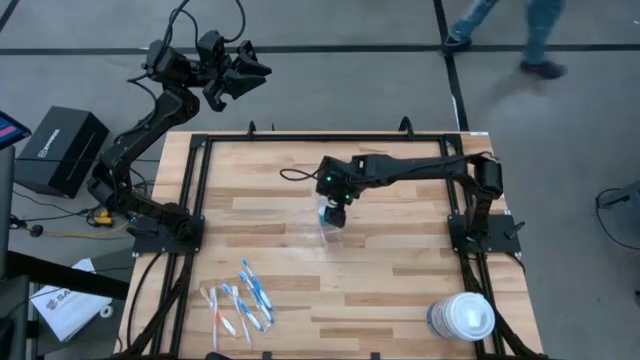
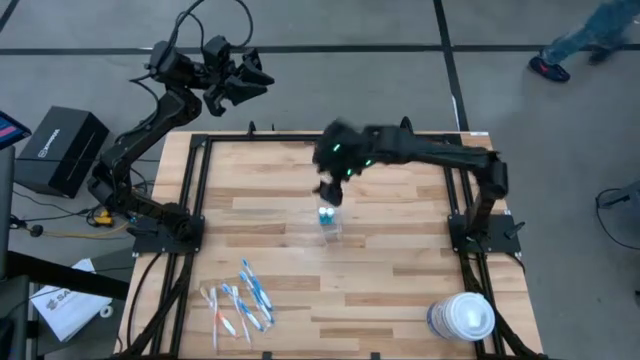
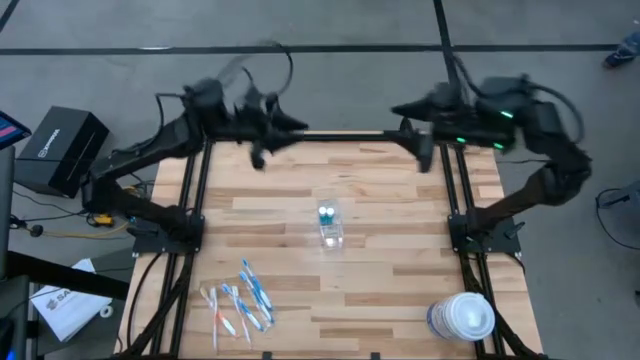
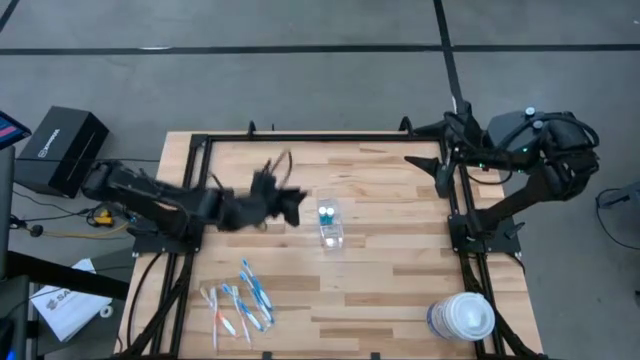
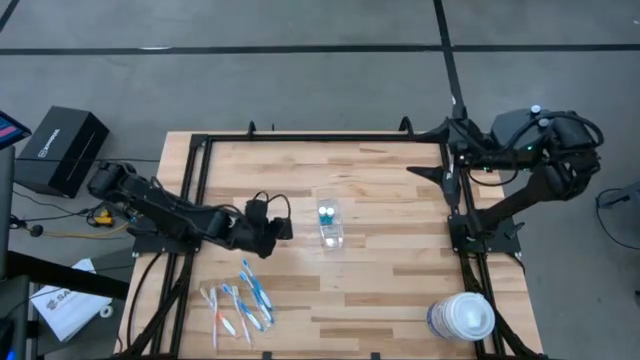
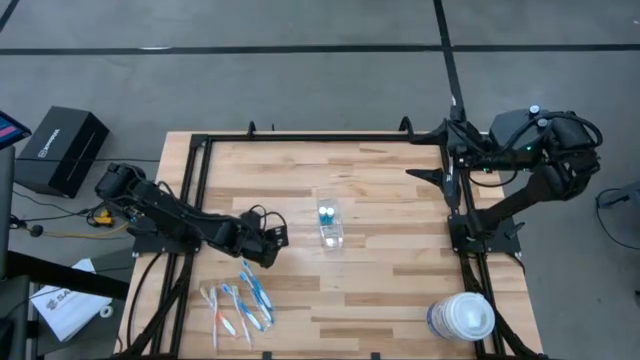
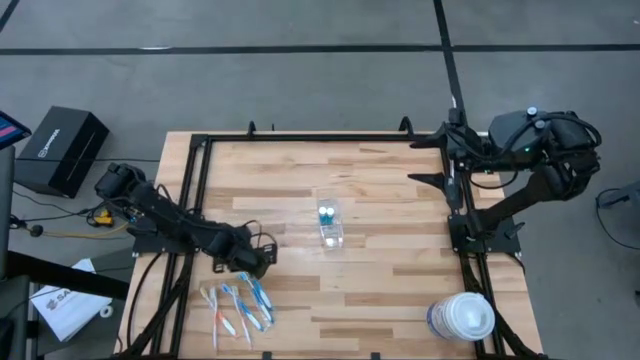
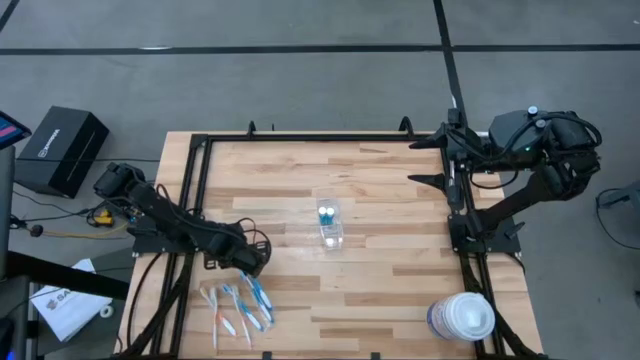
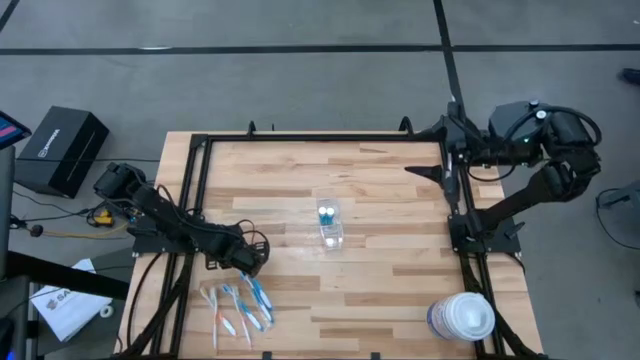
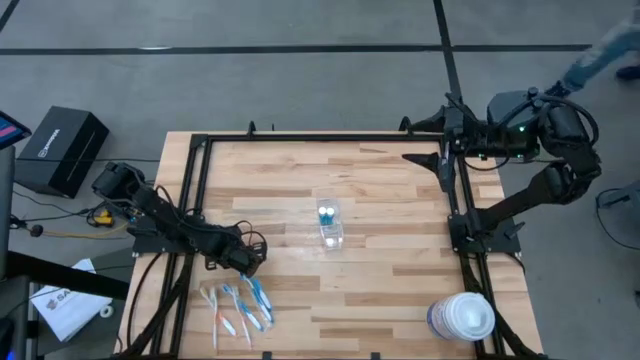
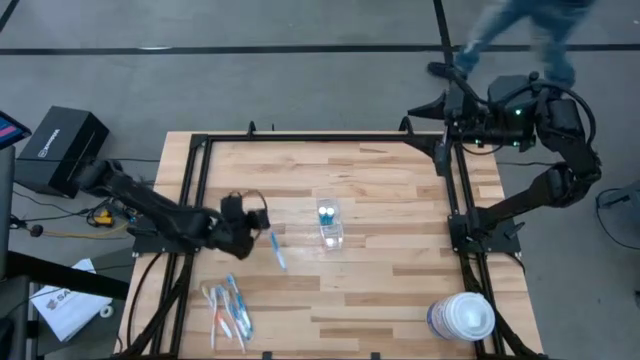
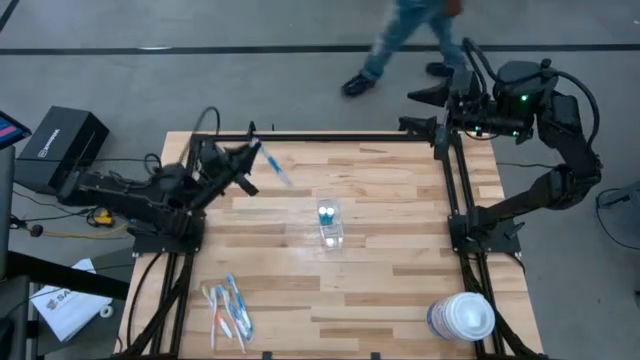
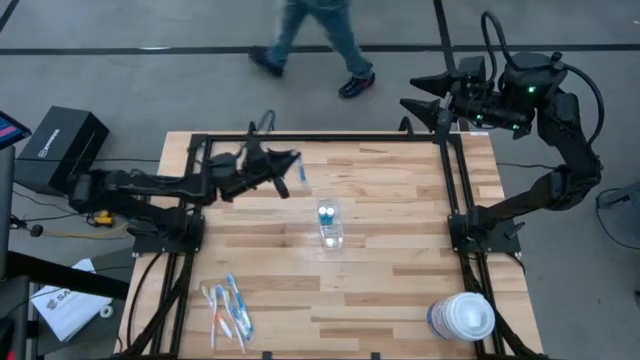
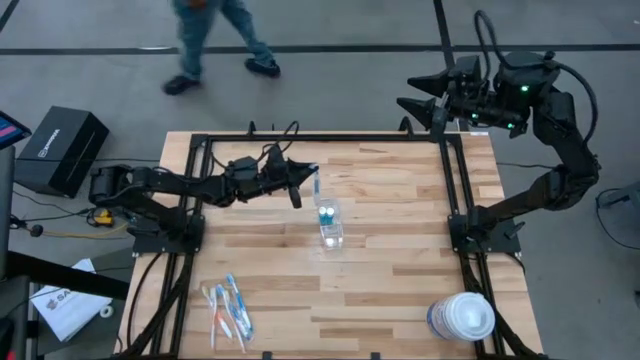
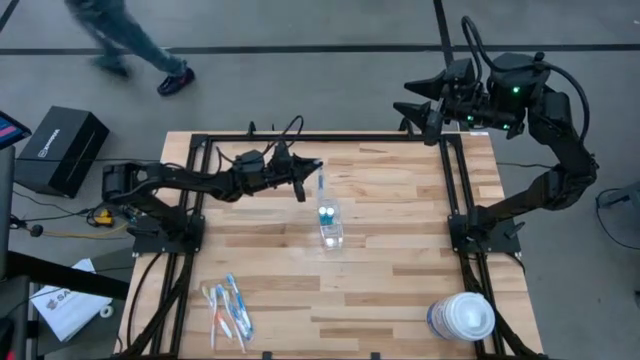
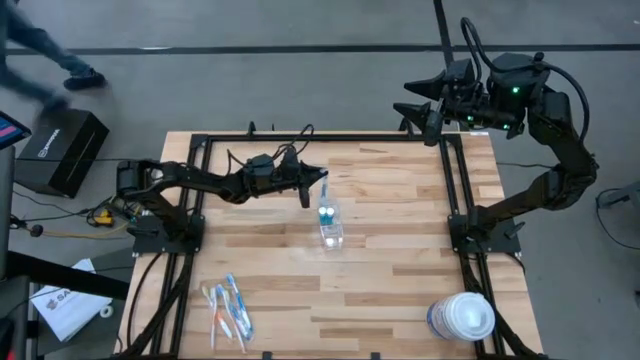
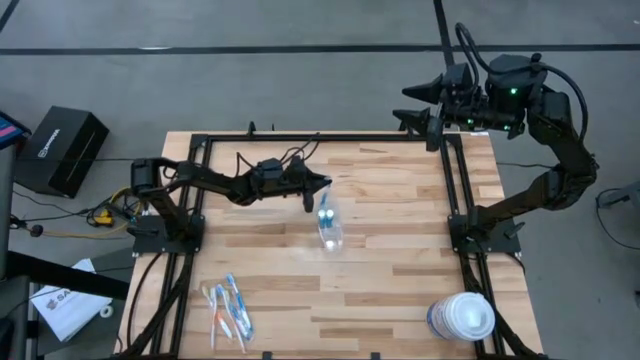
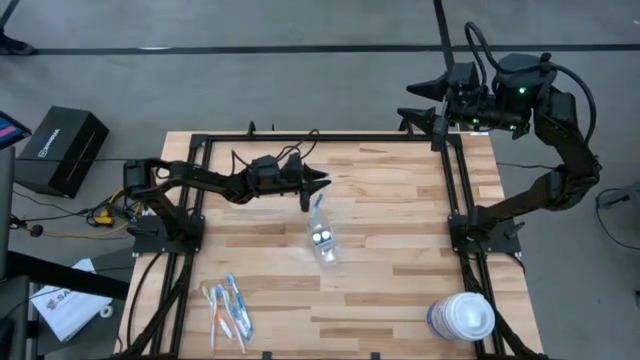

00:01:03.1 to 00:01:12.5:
Task: Pick & Place toothbrushing station
Put the right blue toothbrush into the transparent organizer

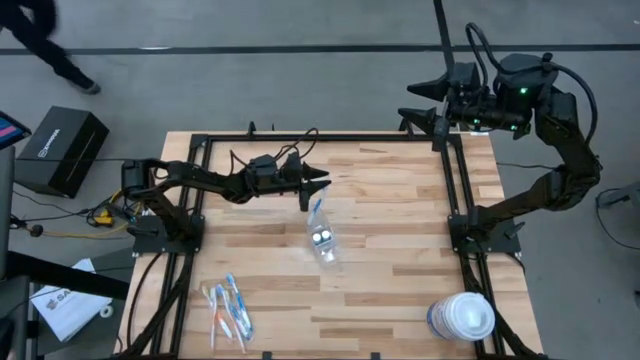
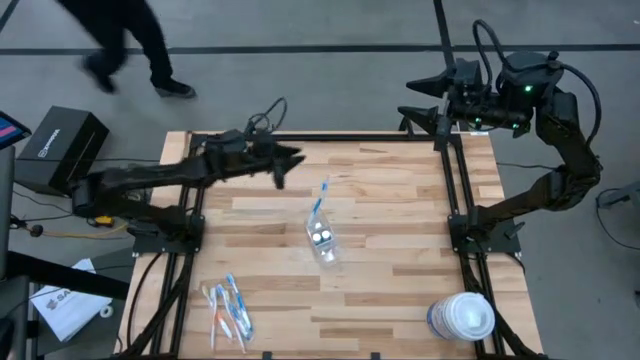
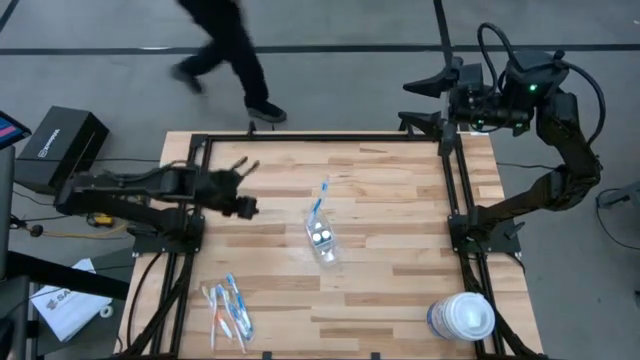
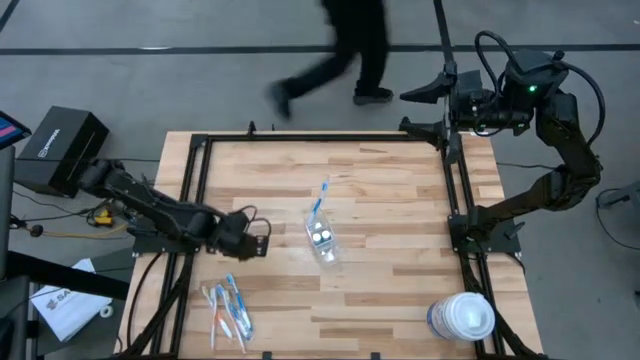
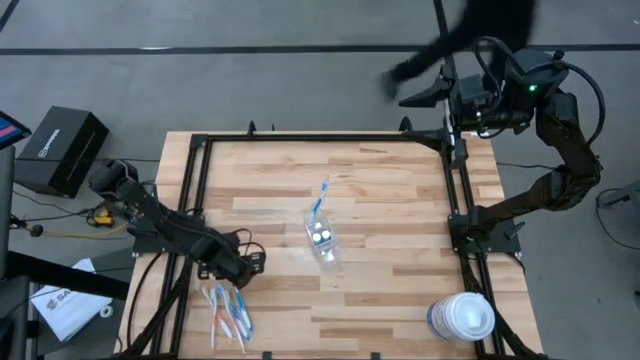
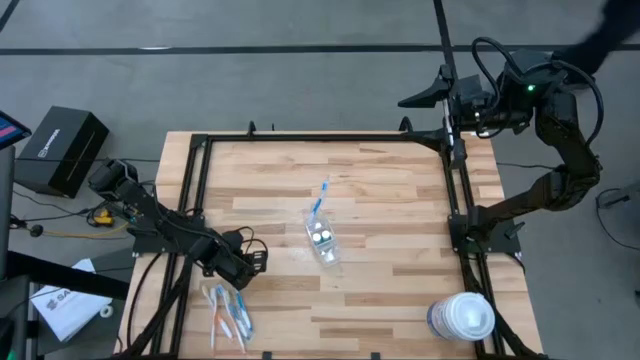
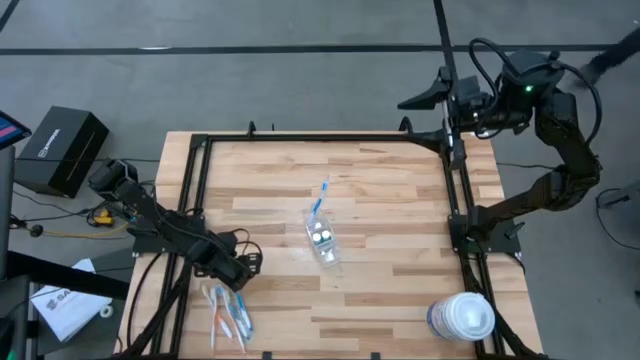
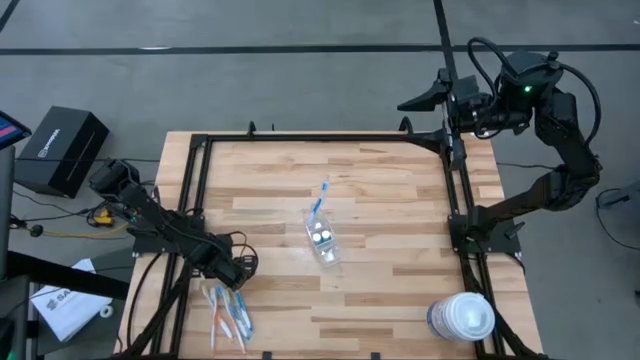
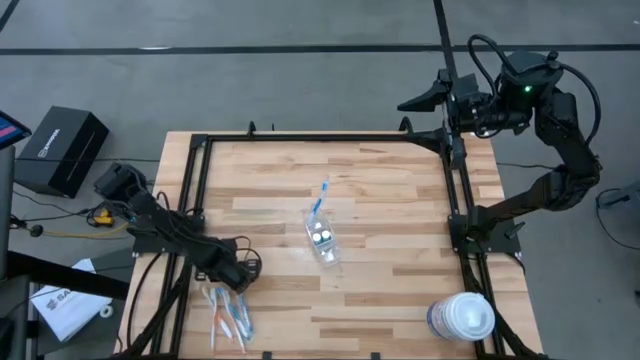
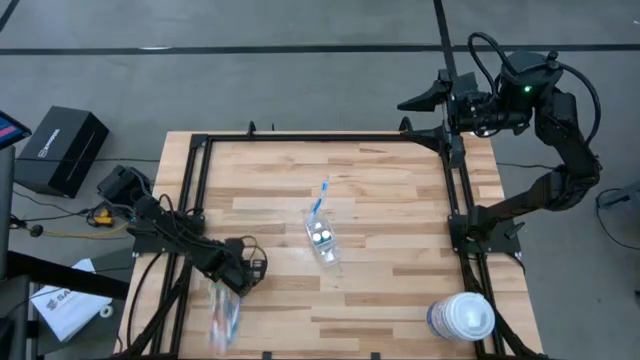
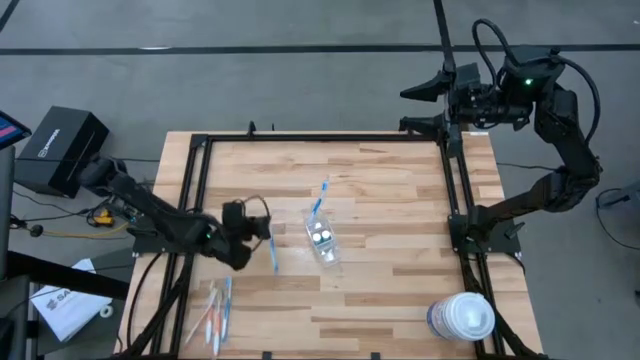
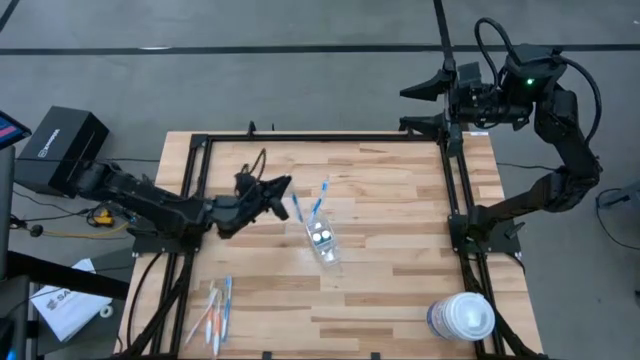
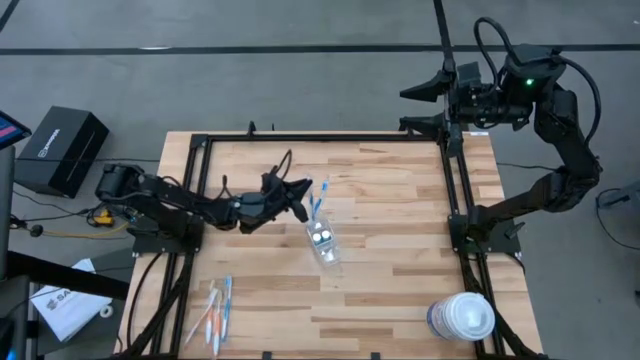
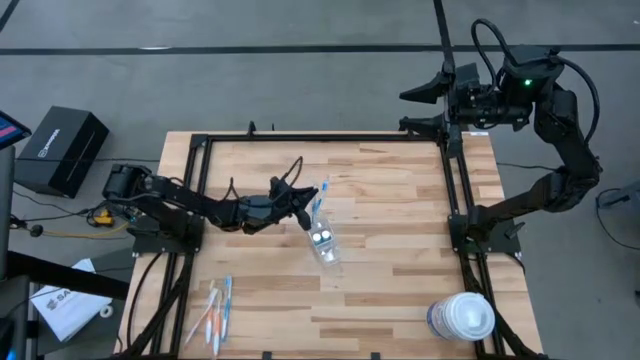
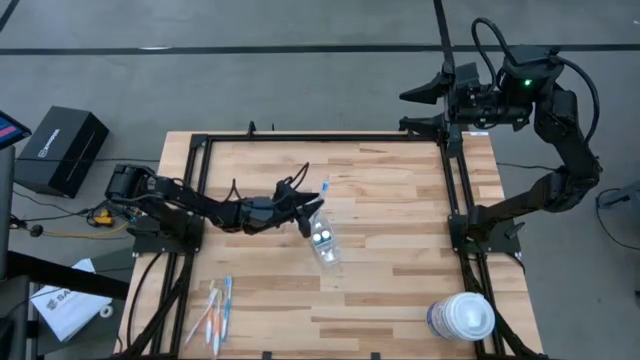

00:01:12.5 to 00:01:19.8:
Put the right blue toothbrush into the transparent organizer

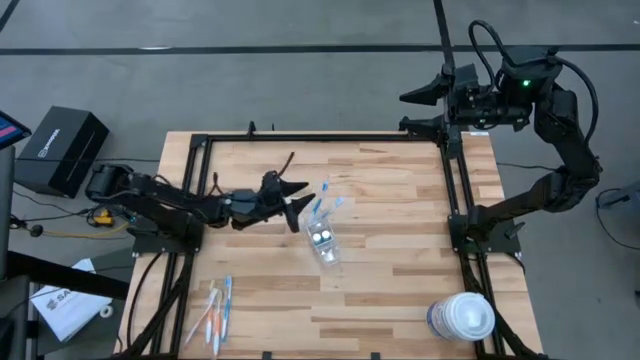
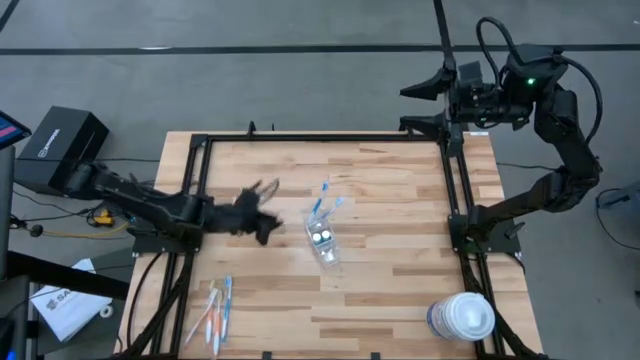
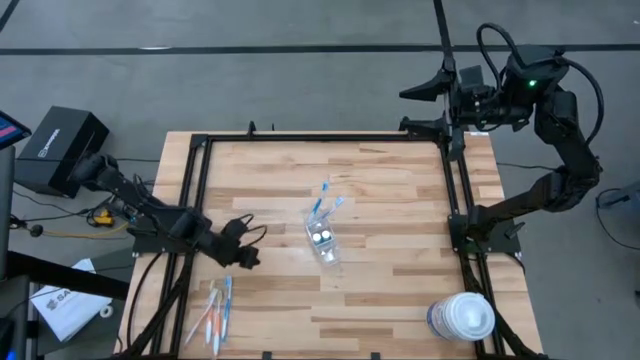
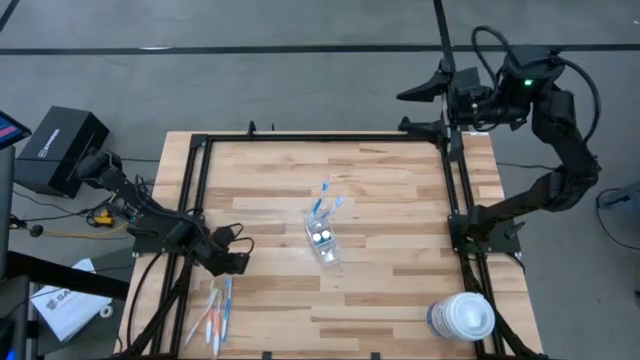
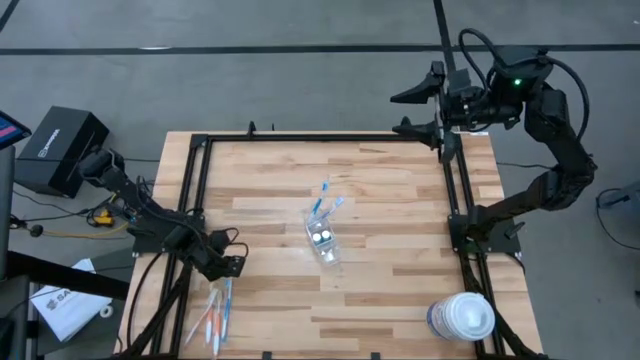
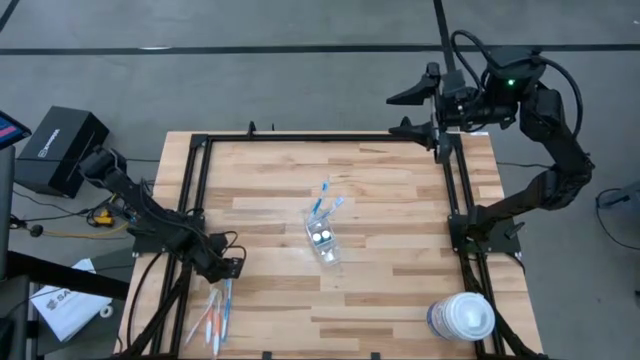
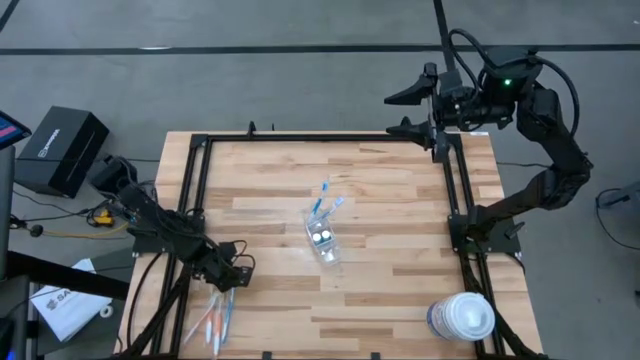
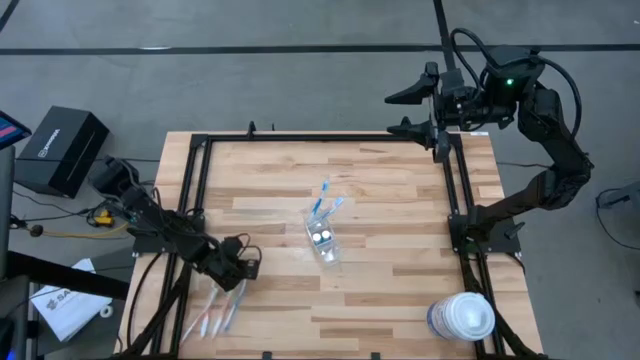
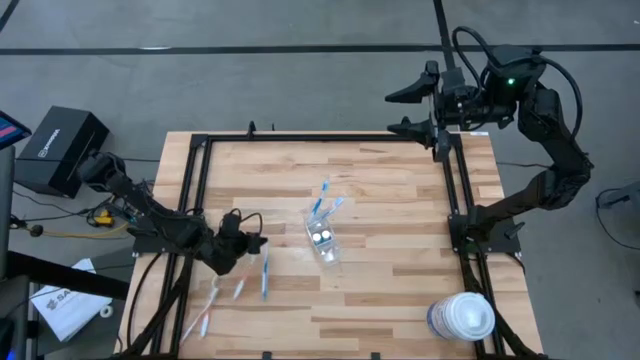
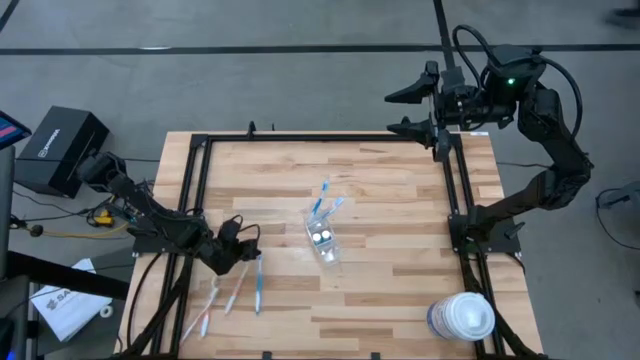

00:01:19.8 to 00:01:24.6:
Put the blue toothbrush into the transparent organizer
